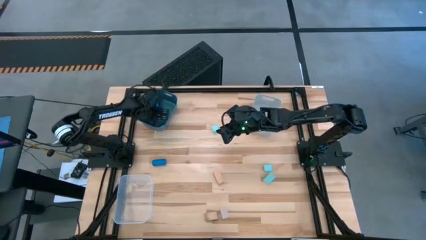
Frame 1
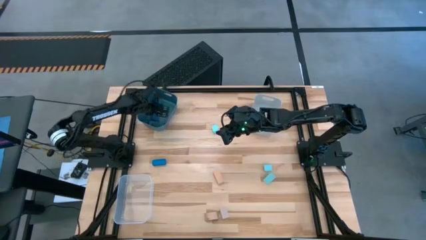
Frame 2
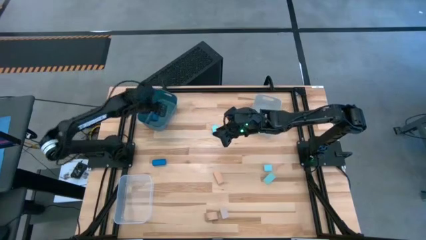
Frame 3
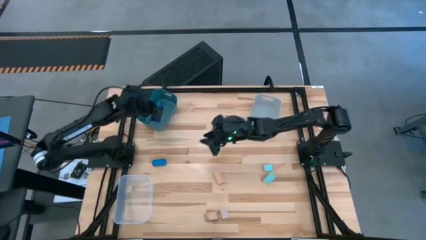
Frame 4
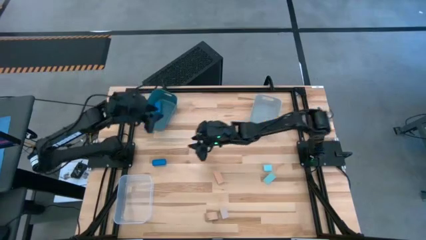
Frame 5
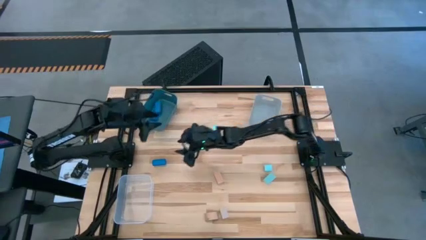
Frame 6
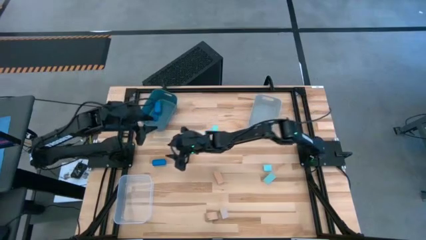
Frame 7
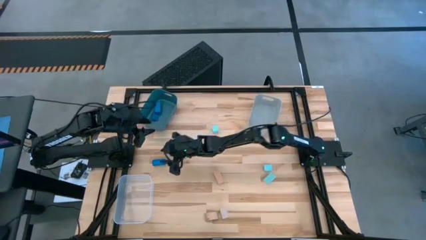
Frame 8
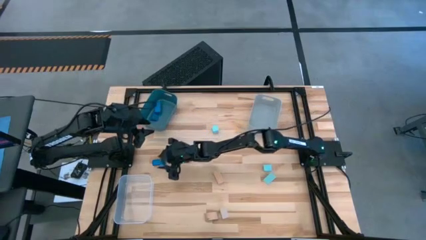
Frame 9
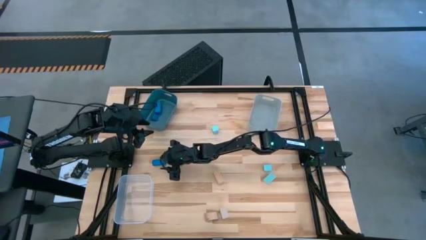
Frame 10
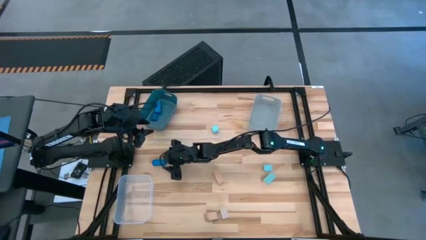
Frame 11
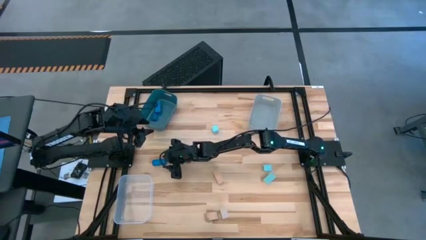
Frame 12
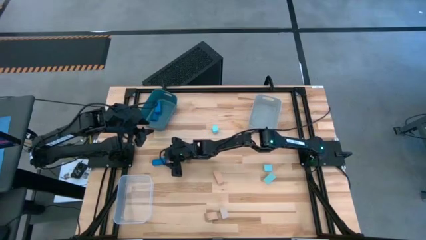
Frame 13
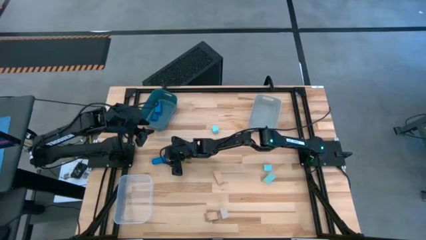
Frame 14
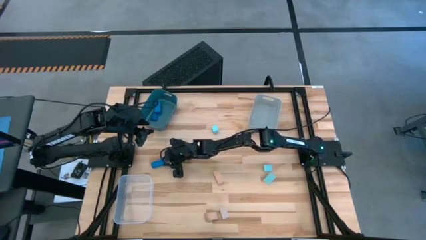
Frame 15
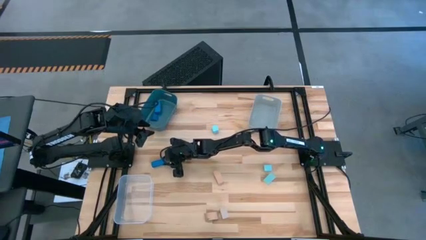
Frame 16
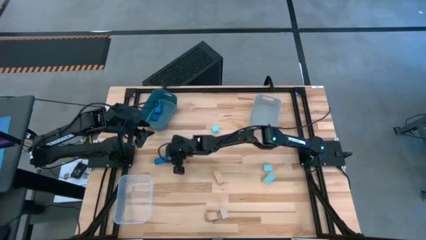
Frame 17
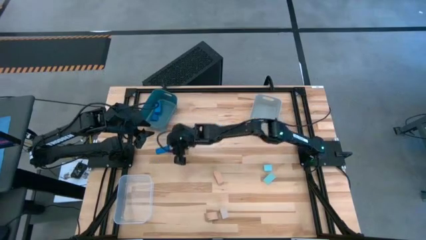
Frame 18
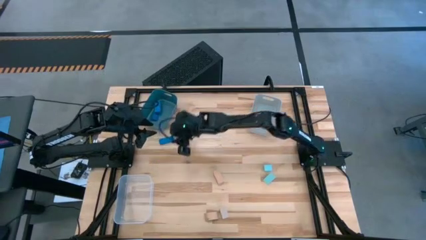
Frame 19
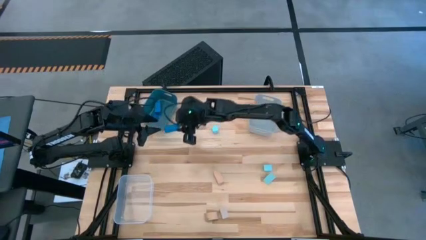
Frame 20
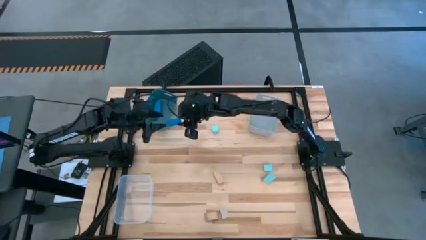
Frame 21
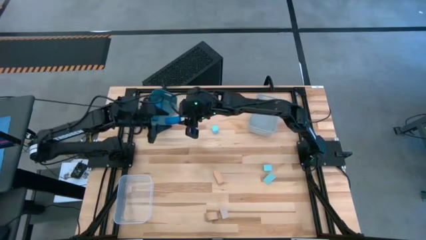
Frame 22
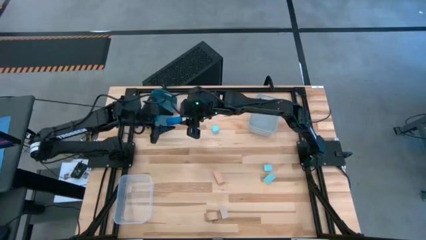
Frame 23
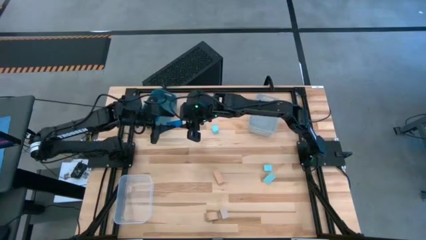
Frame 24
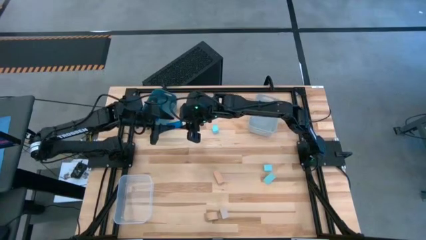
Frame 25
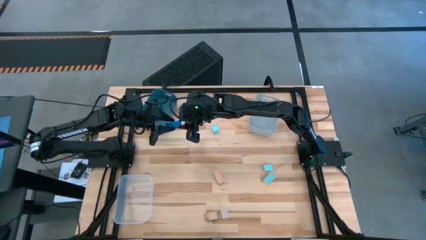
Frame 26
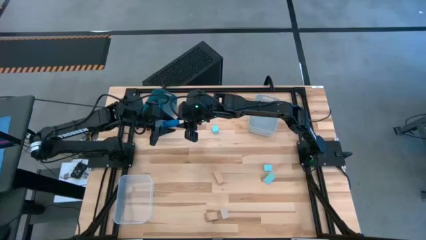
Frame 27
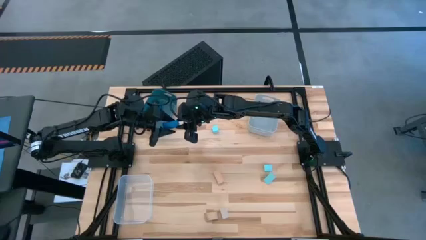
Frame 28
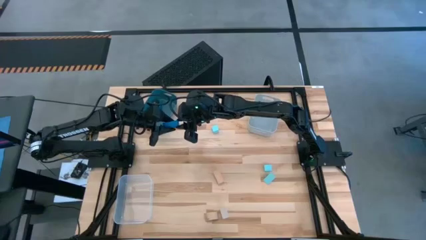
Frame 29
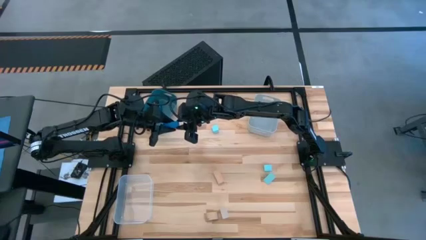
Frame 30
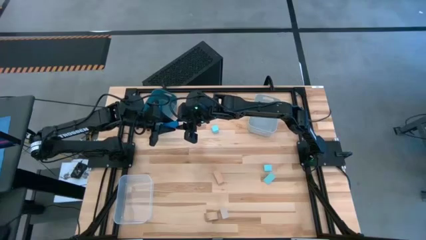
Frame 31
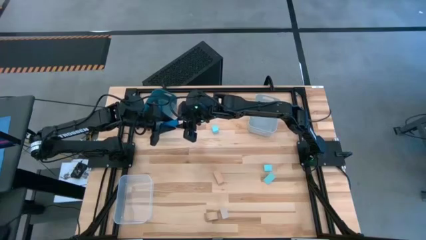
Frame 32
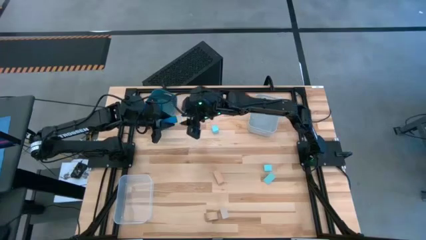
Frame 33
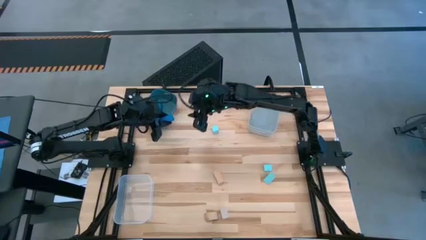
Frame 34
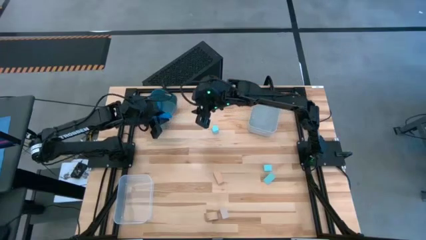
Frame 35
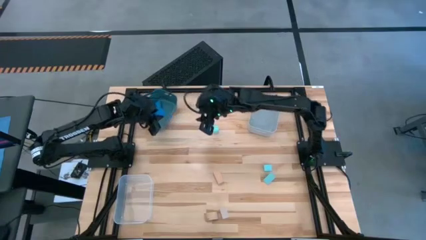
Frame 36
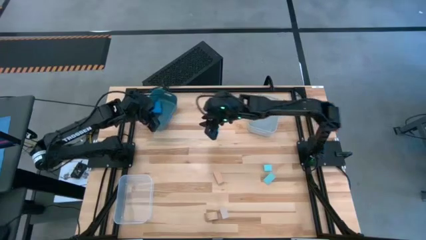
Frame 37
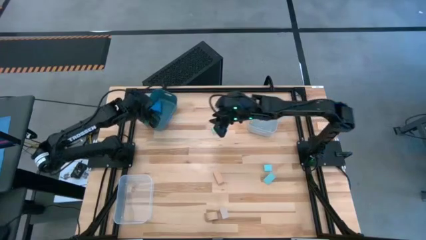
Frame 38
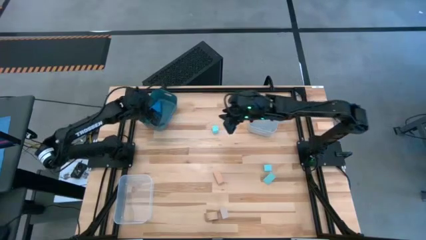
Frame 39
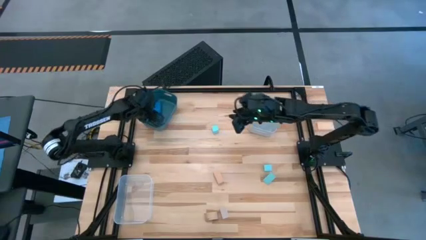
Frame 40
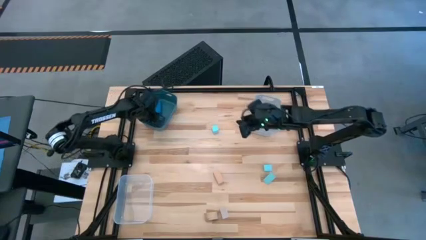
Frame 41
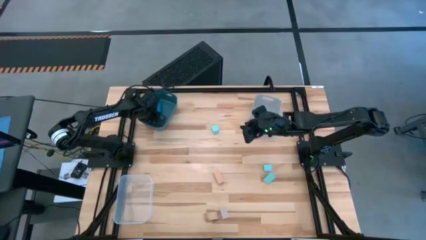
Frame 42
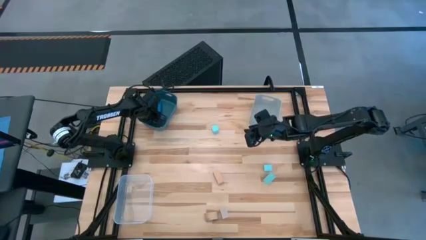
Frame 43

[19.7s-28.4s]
Task: Sort & place blocks by color
Put the blue block into the blue bin

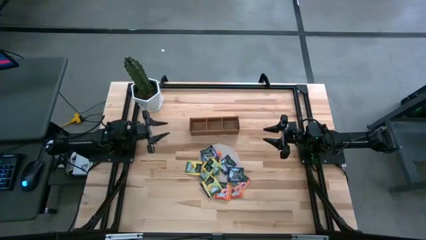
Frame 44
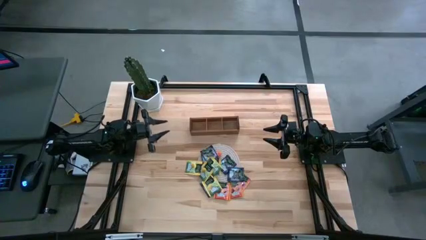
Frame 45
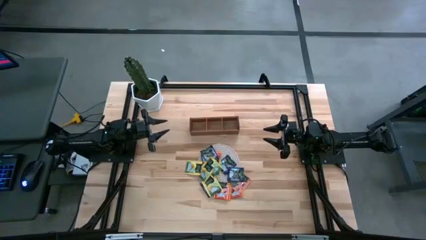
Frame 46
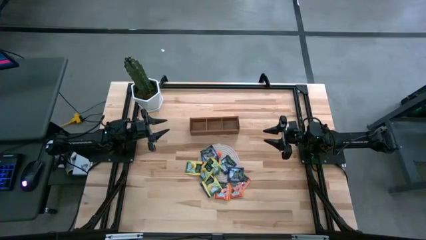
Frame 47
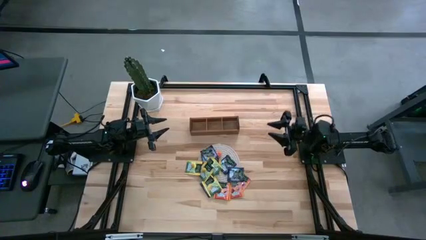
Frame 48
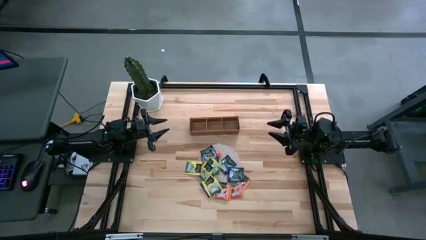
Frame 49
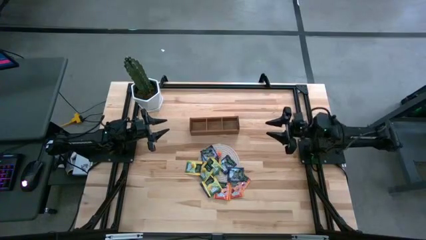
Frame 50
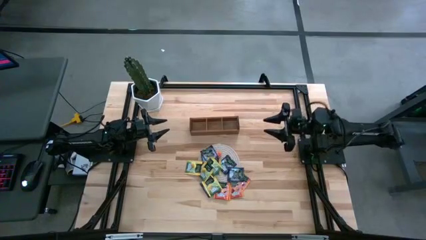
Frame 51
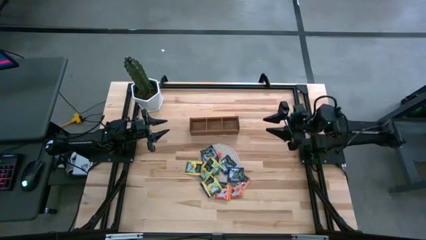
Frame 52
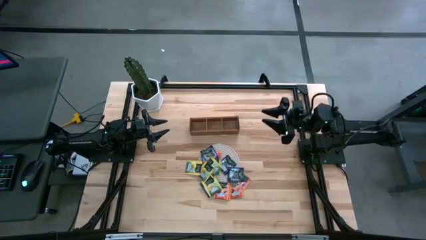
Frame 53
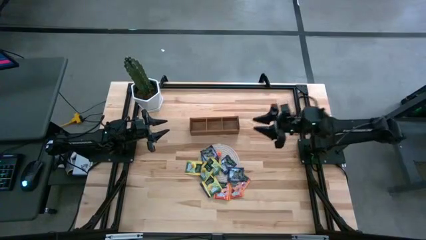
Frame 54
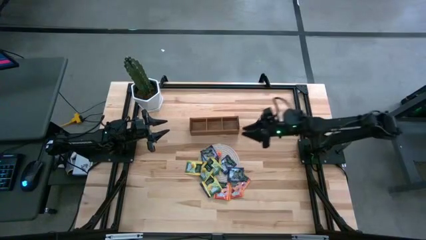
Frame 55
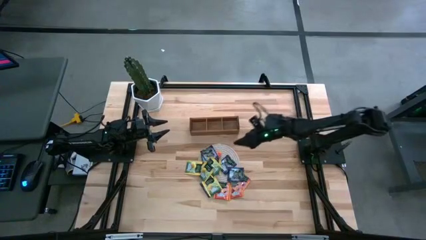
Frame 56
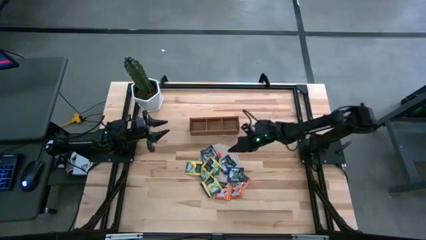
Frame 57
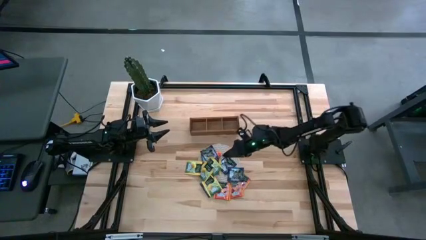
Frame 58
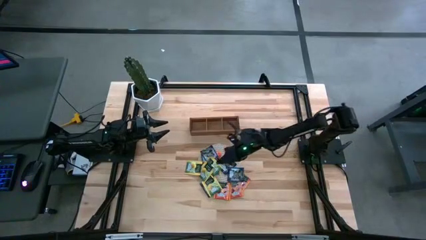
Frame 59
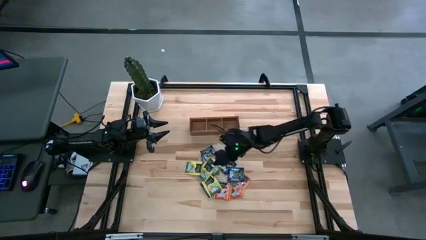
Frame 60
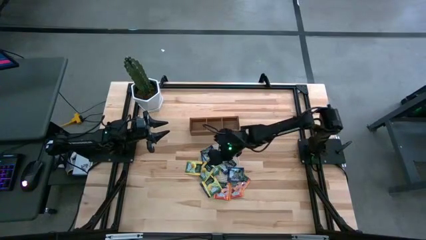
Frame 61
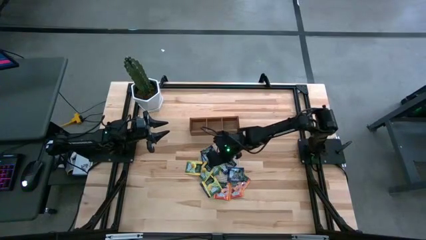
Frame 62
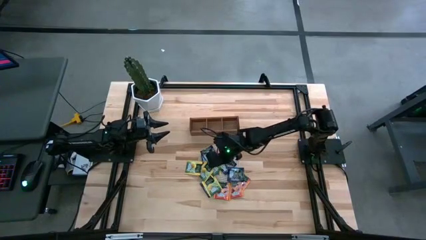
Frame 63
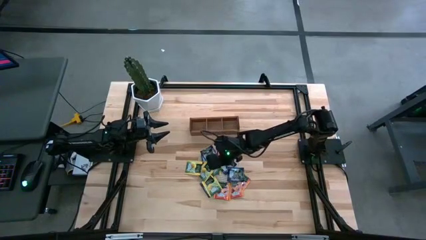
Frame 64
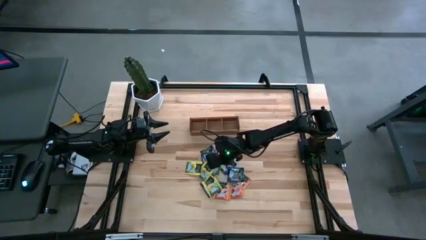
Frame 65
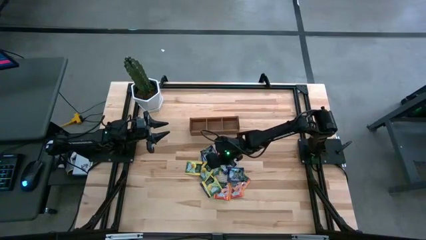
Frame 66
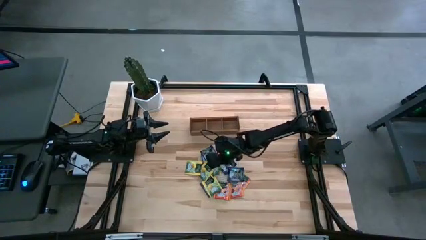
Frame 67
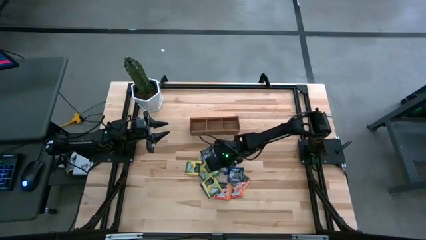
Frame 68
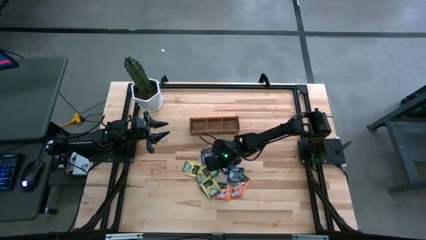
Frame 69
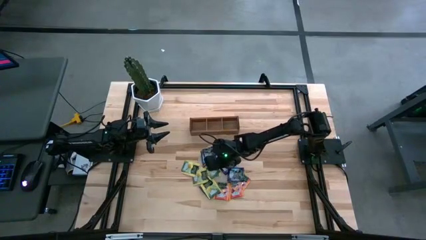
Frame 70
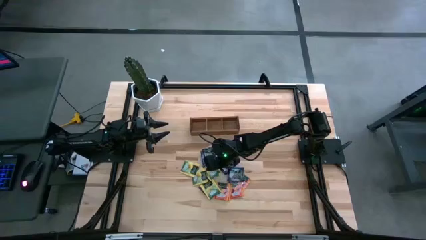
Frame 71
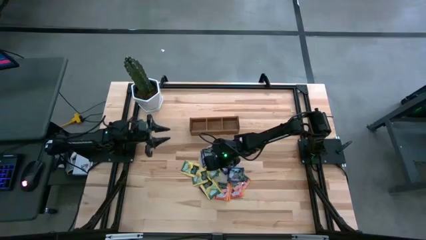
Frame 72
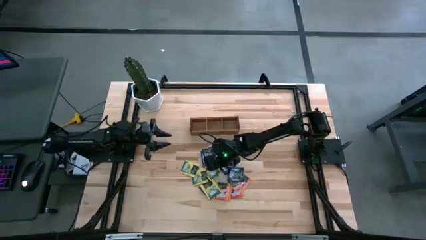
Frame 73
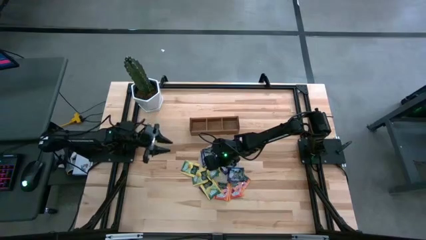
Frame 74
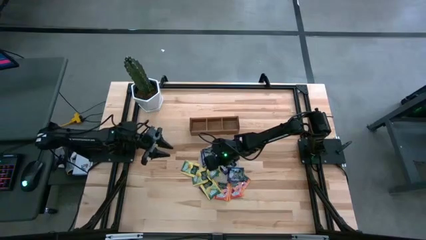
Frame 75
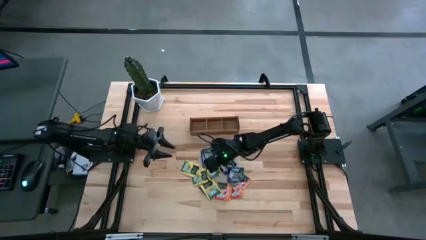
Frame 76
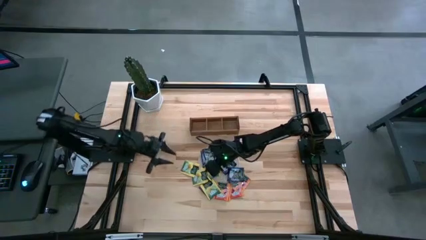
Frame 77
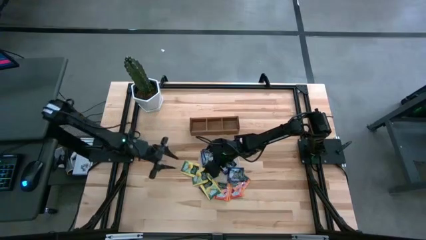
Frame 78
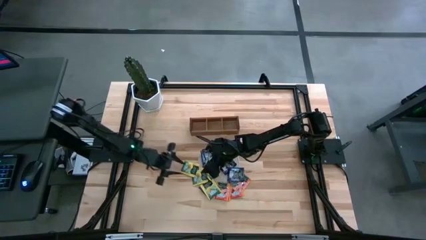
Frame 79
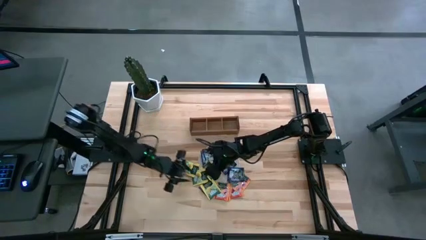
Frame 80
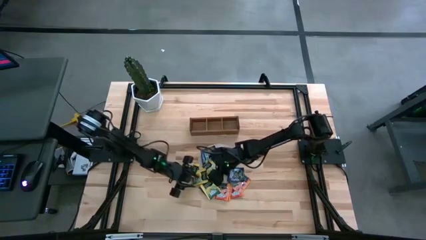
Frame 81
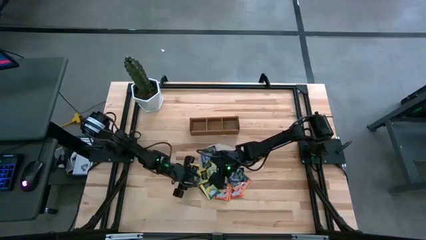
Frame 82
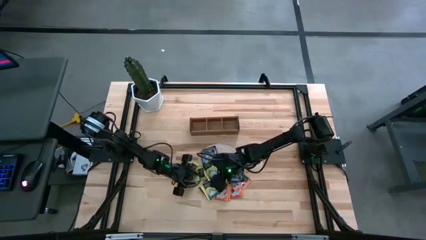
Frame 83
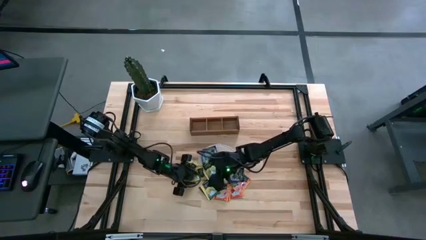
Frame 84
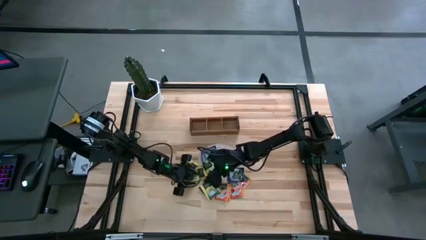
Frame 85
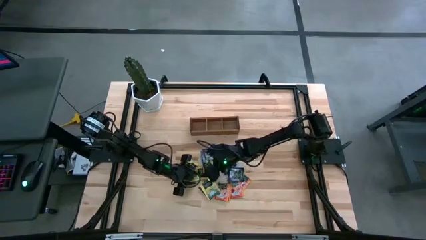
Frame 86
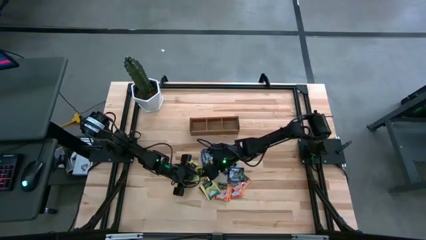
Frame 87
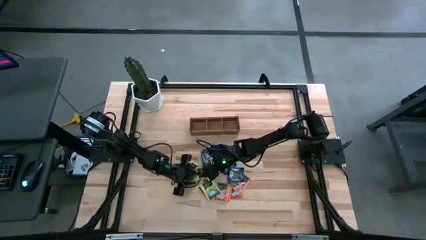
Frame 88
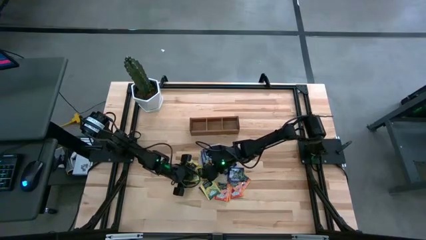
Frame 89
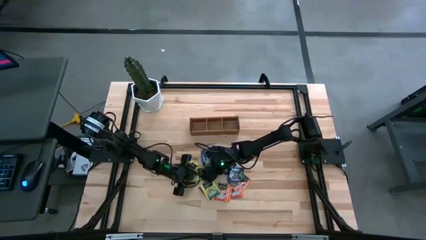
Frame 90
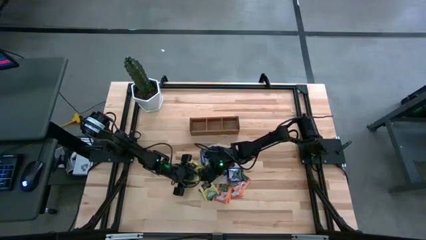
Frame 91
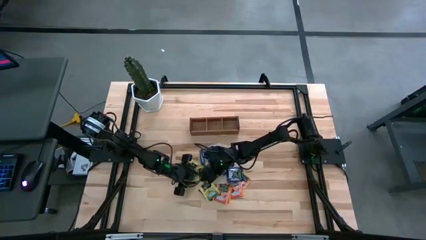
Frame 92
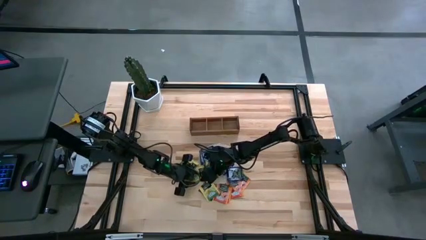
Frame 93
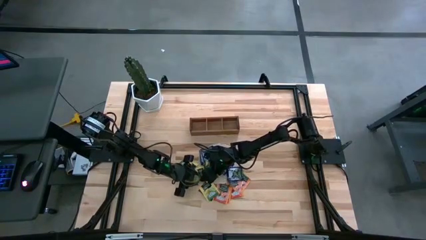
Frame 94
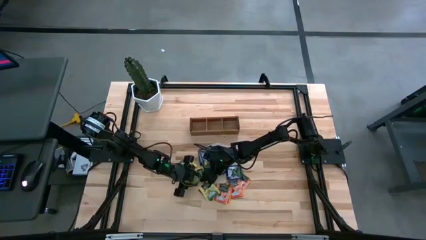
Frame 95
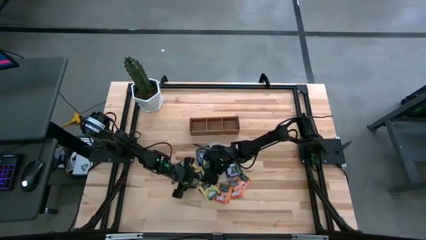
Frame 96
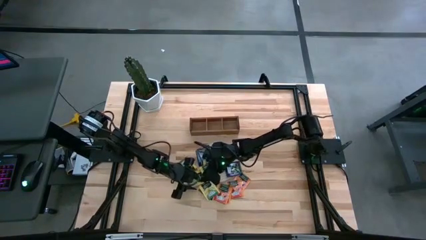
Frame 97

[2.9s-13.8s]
Task: Pick & Place Tea
Put the yellow tea bag into the left section of the wooden organizer
